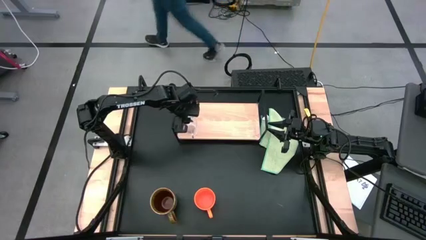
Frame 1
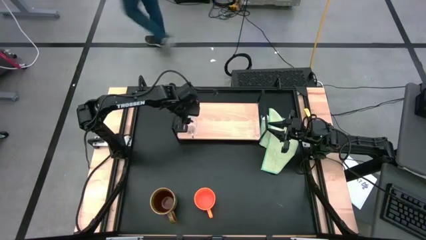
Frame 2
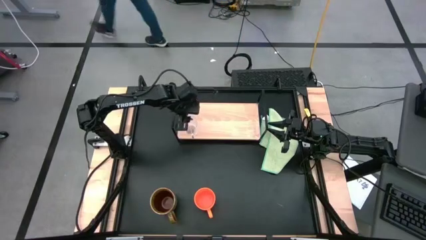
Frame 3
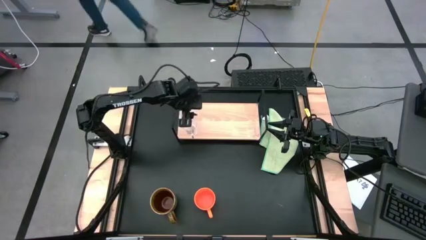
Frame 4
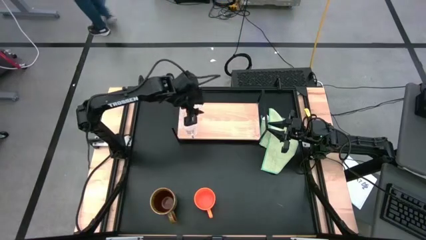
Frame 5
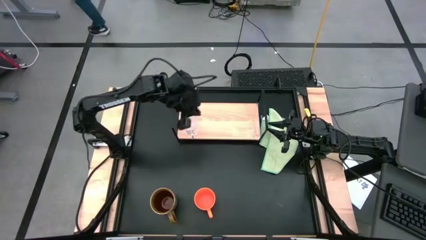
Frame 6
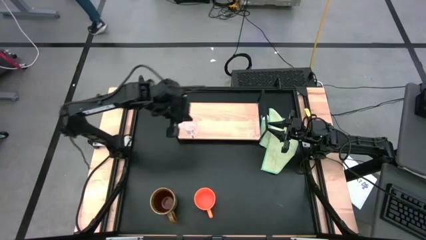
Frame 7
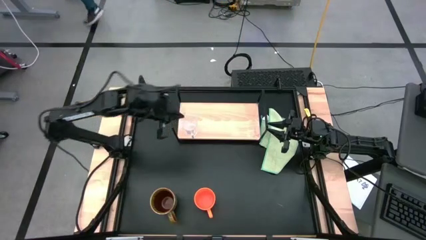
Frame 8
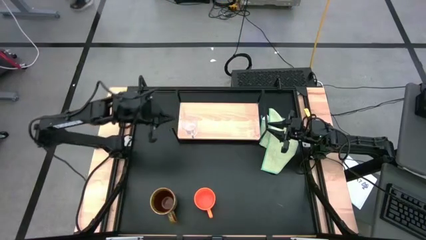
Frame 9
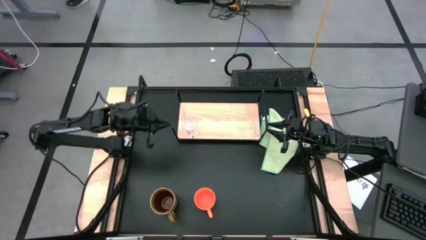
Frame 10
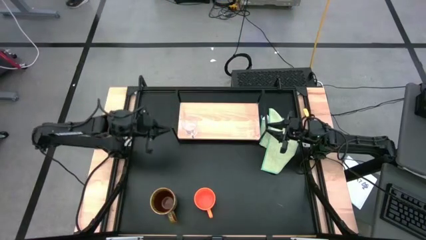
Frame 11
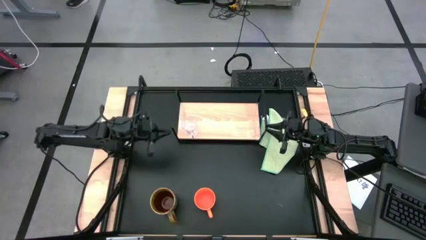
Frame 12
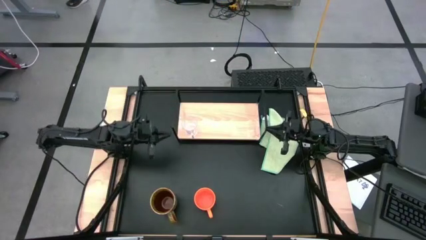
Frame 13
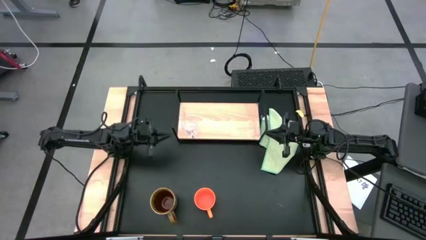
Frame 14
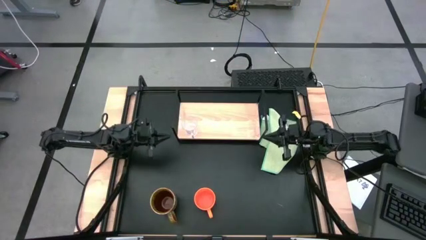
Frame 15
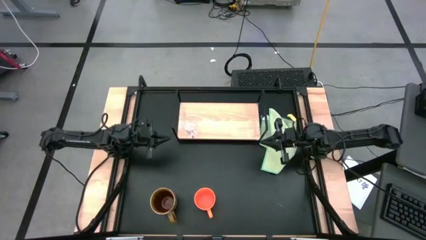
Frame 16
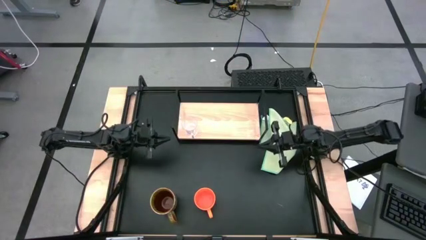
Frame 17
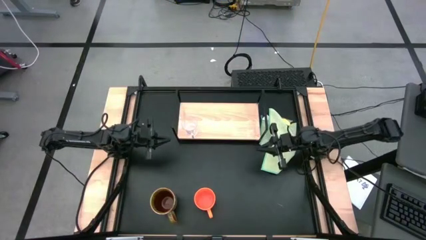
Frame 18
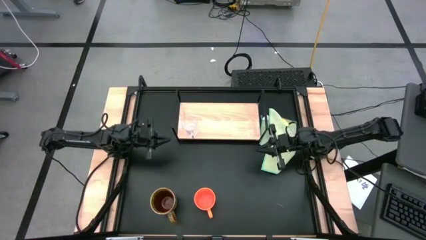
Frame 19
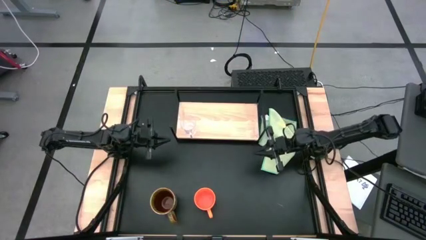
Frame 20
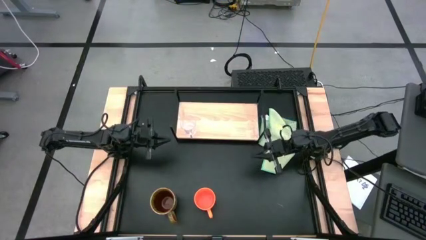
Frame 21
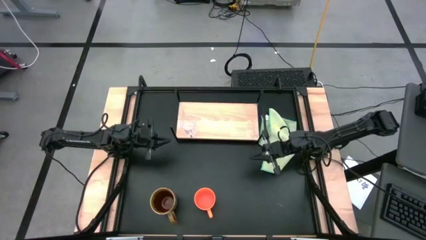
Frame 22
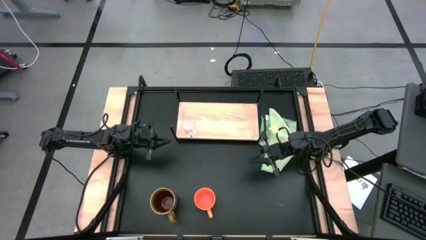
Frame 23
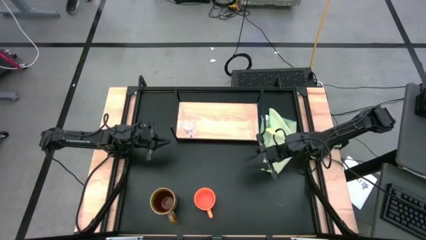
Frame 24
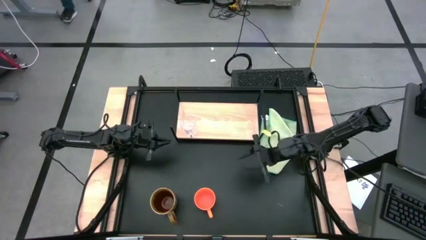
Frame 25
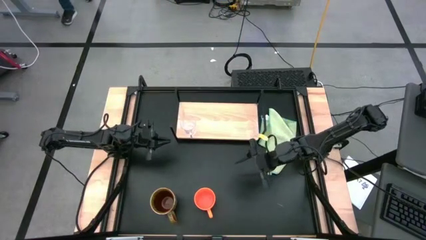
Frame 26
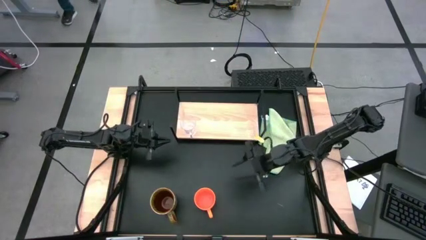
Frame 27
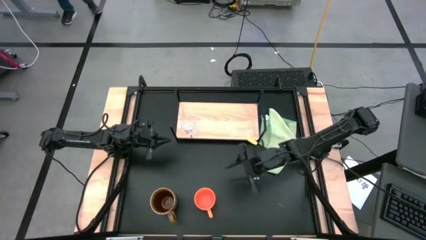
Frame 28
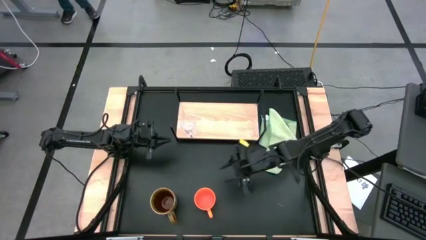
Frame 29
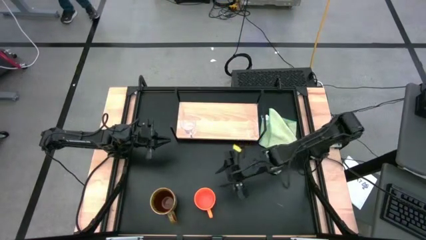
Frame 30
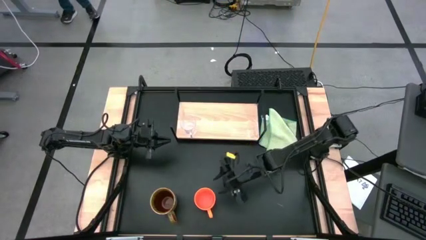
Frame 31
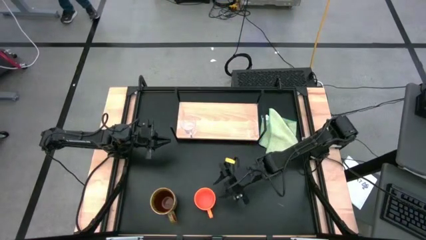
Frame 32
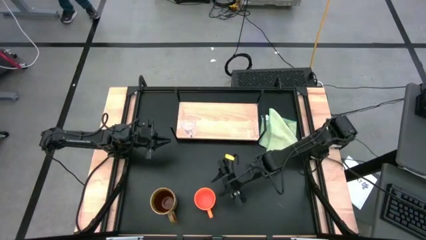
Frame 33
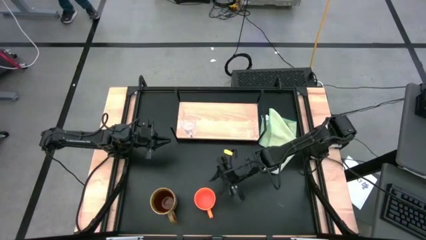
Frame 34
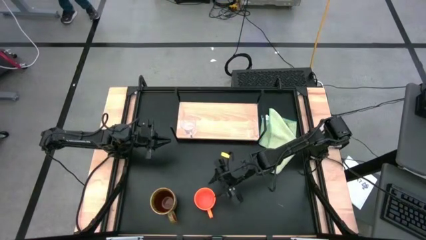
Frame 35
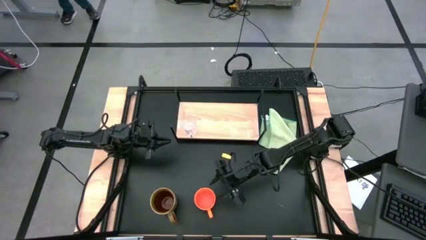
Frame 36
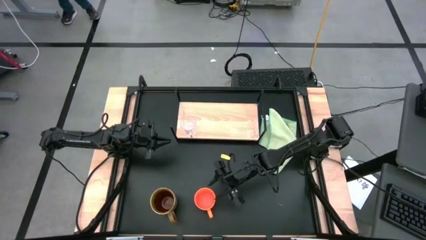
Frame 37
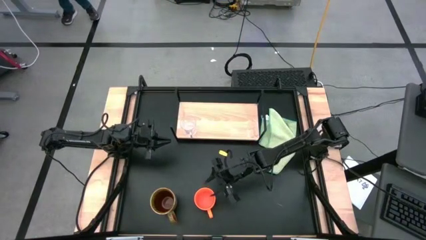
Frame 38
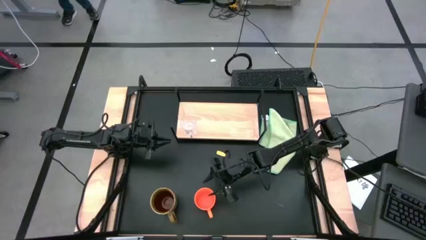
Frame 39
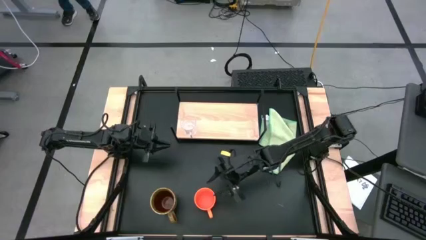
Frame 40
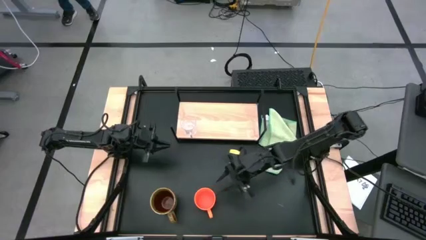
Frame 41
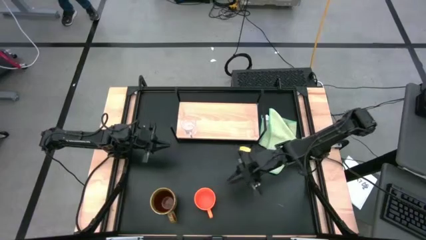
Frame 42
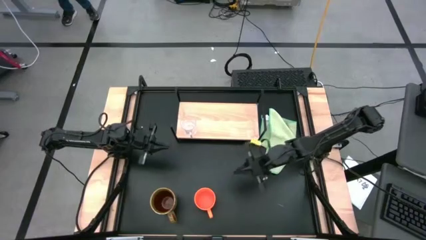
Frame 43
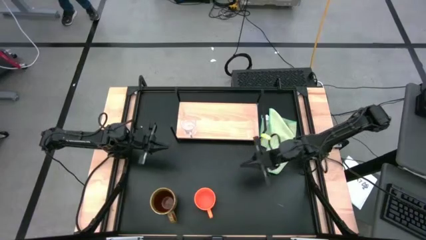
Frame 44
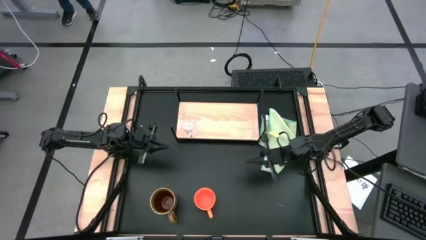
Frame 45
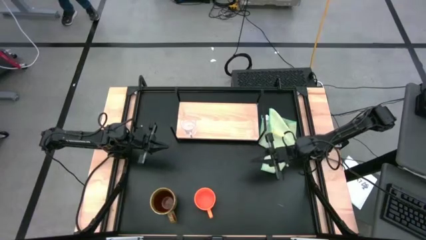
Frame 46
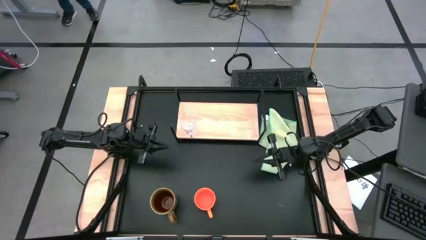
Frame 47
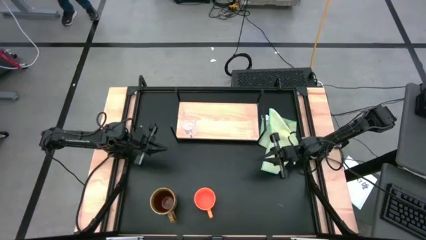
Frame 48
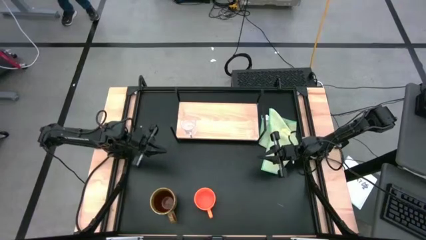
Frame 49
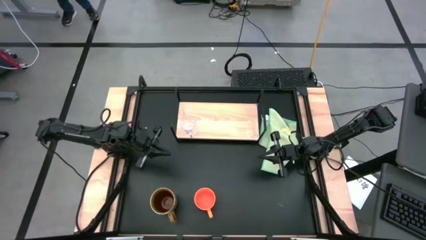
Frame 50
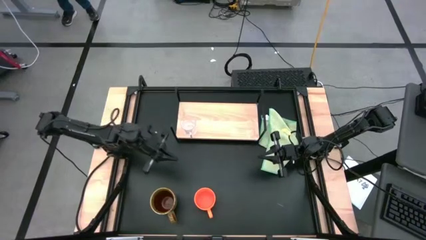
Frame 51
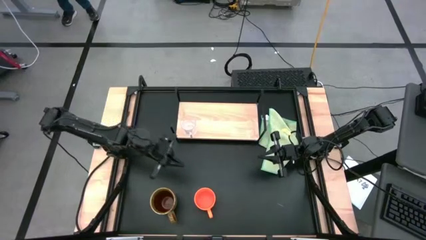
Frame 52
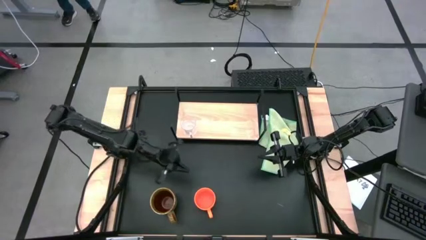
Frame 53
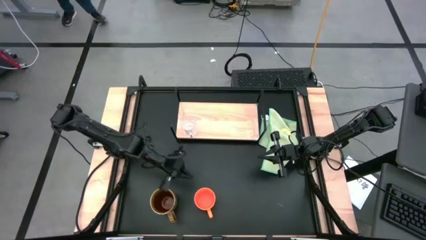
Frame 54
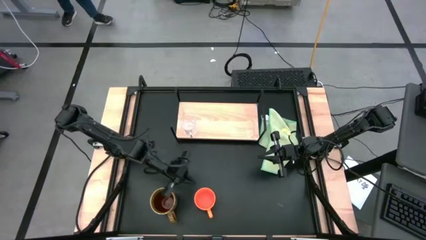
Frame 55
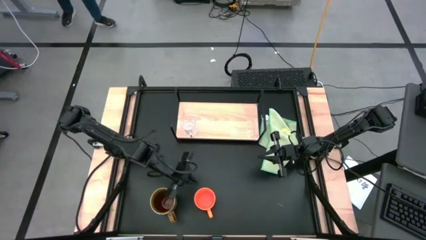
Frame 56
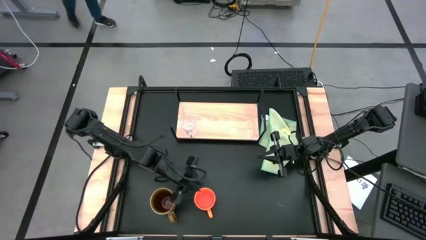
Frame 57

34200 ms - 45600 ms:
Task: Stack small to large cups/mugs on shelf
Put the orange mug on the shelf
